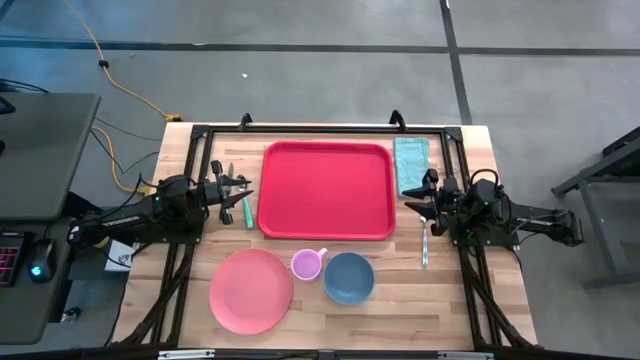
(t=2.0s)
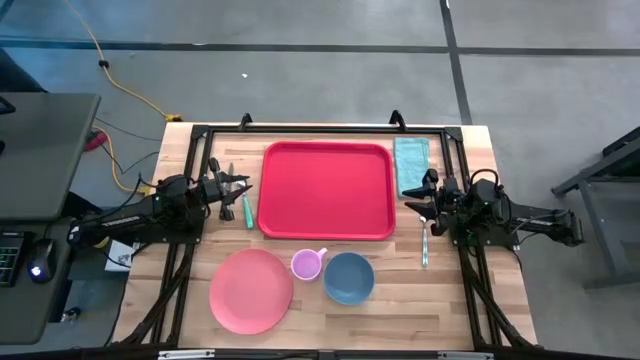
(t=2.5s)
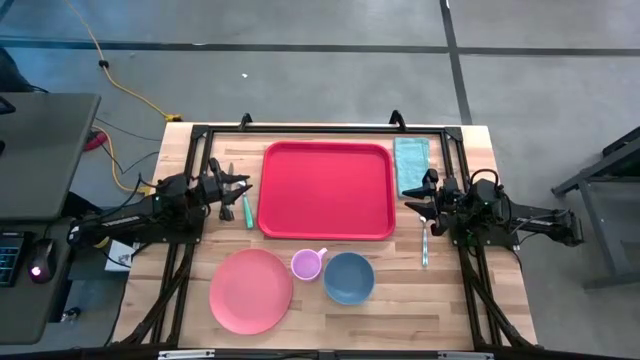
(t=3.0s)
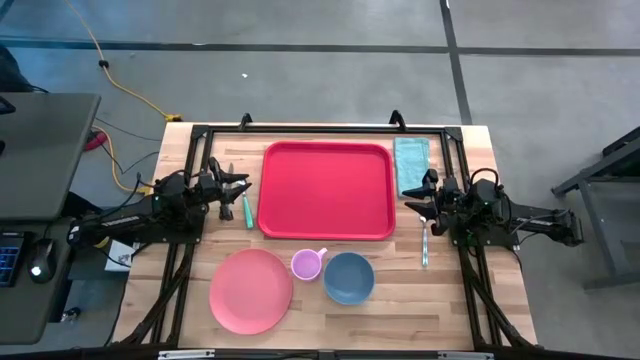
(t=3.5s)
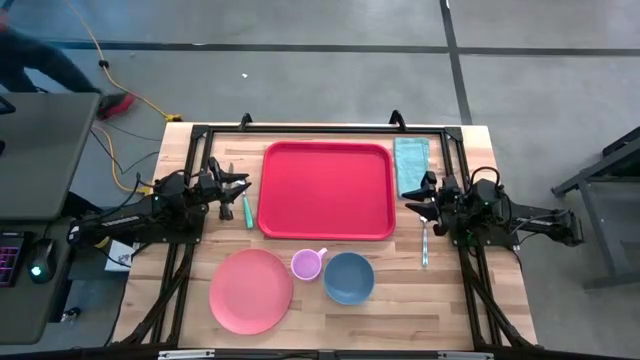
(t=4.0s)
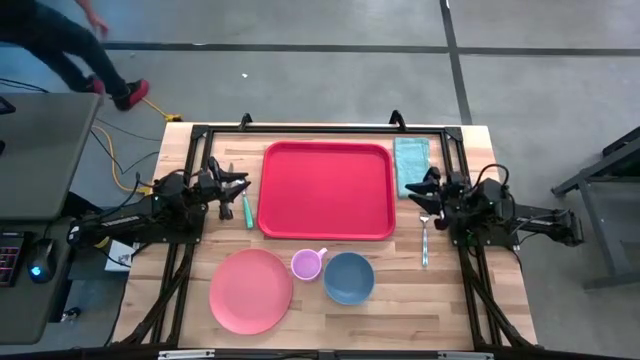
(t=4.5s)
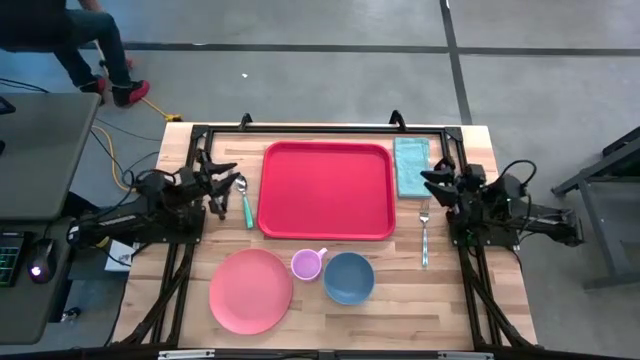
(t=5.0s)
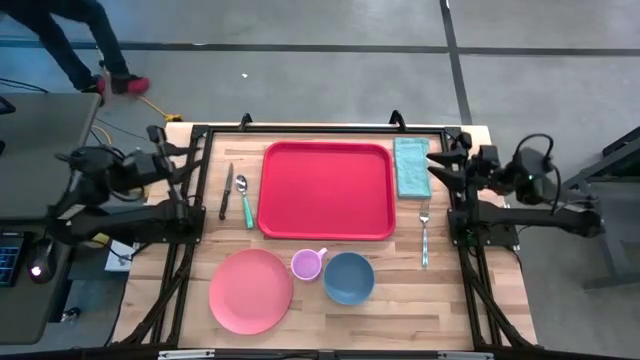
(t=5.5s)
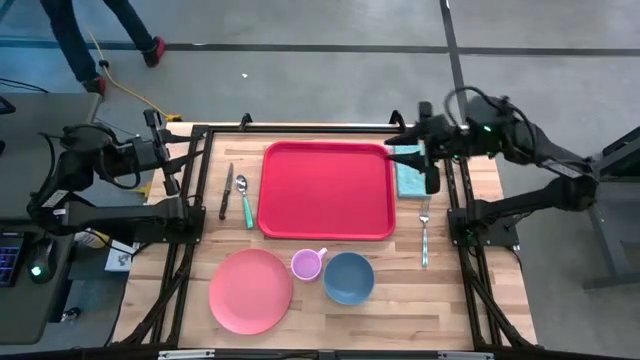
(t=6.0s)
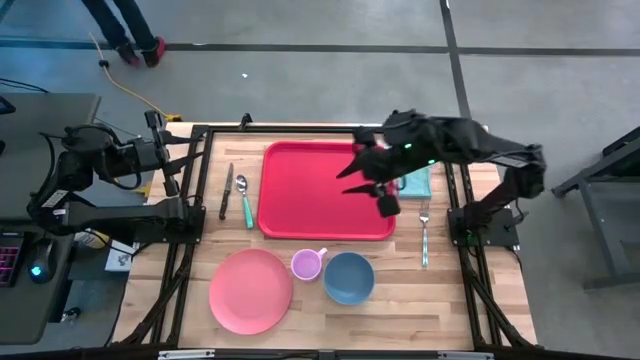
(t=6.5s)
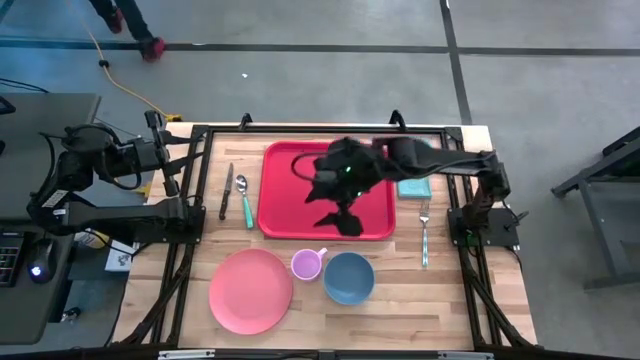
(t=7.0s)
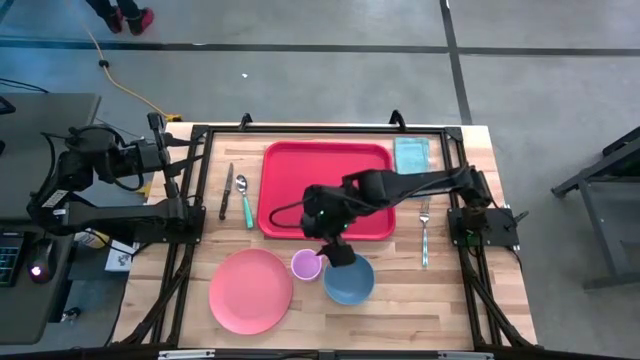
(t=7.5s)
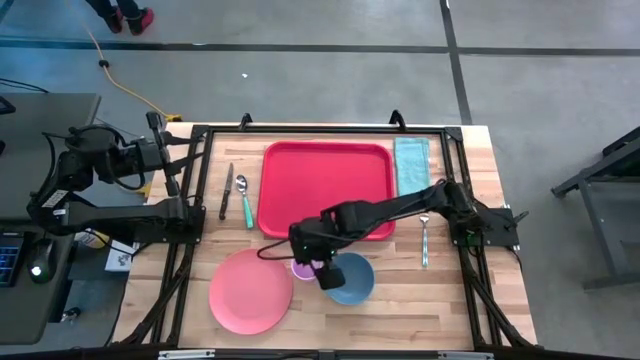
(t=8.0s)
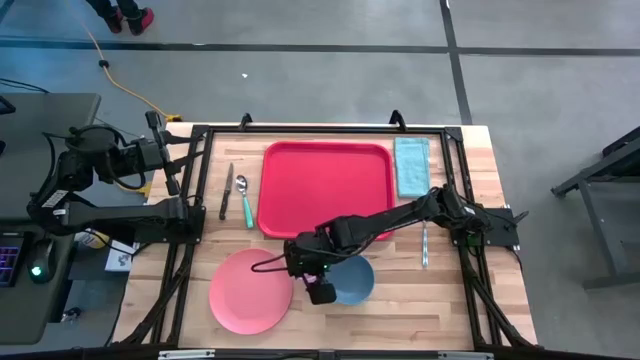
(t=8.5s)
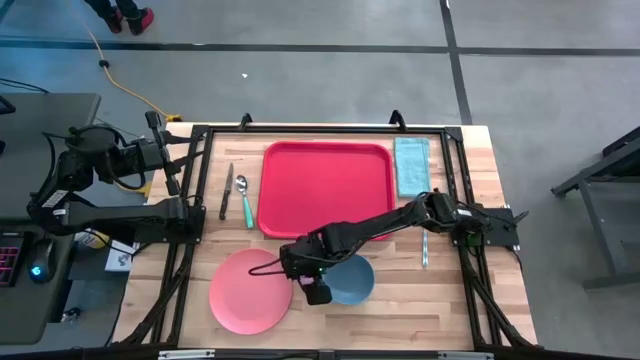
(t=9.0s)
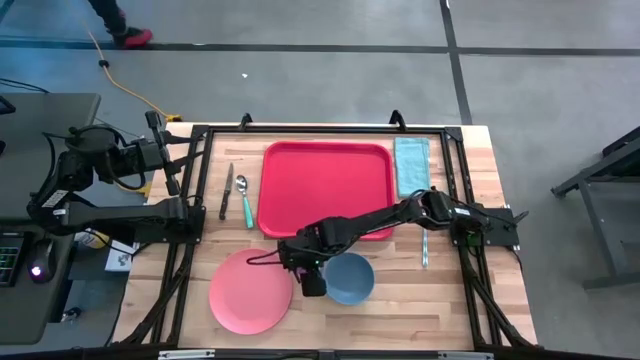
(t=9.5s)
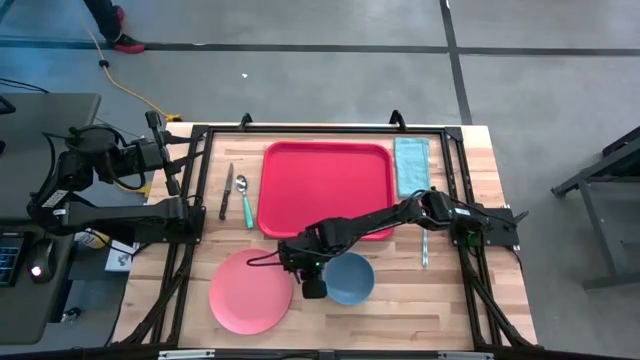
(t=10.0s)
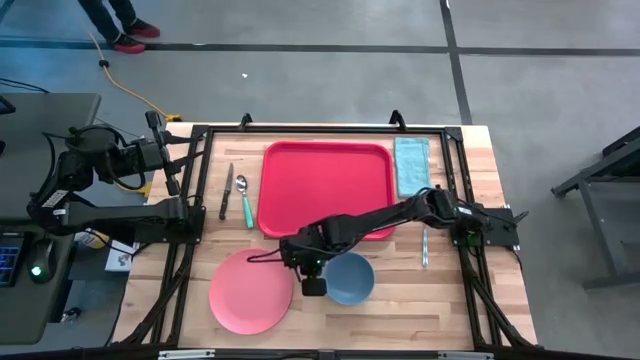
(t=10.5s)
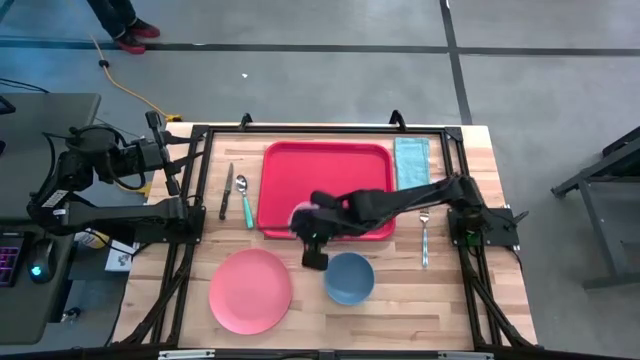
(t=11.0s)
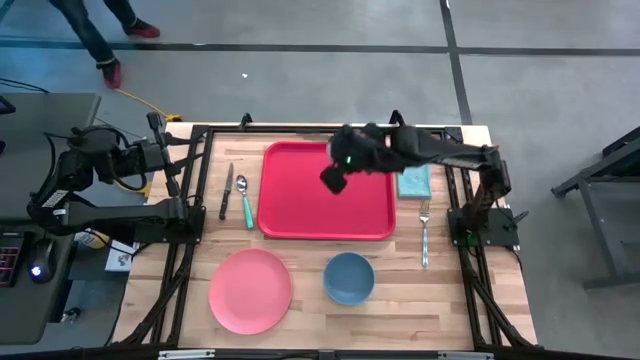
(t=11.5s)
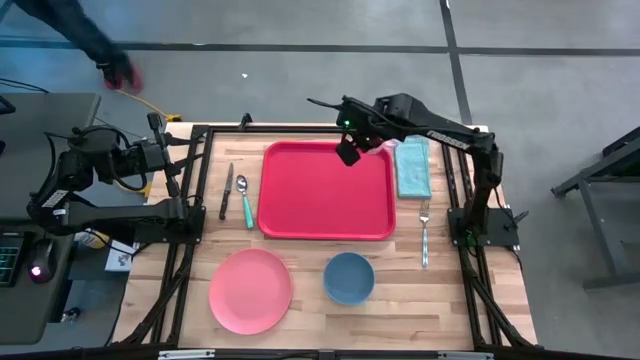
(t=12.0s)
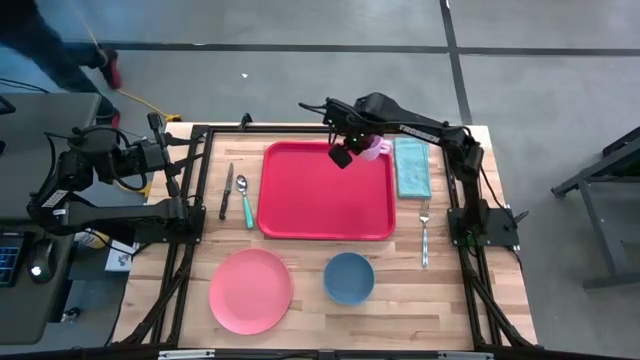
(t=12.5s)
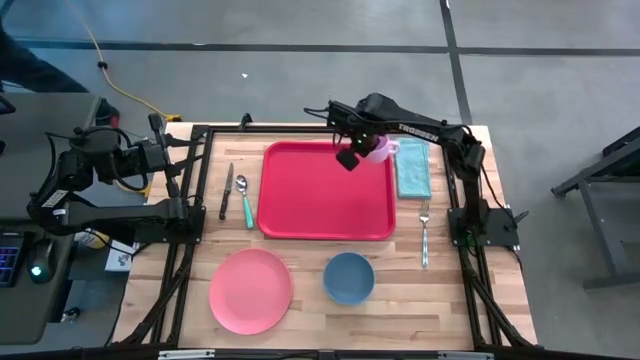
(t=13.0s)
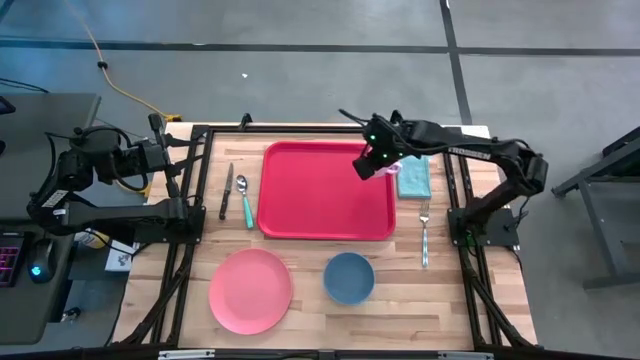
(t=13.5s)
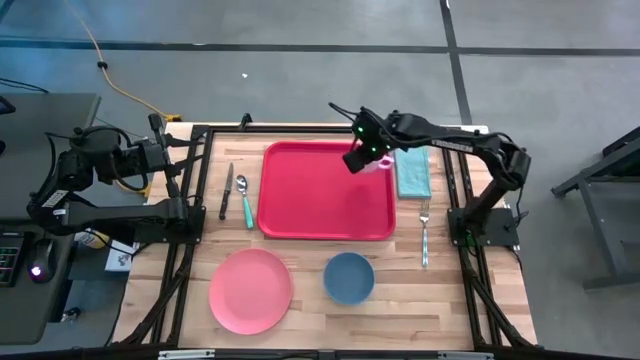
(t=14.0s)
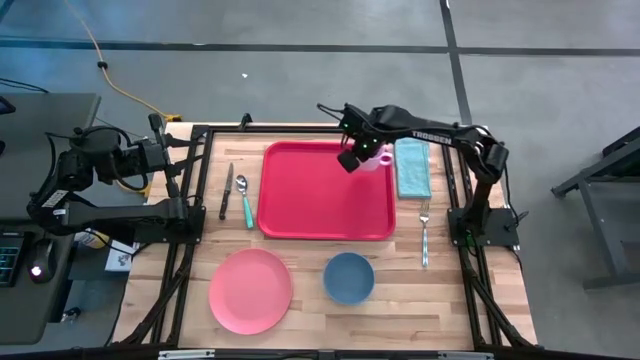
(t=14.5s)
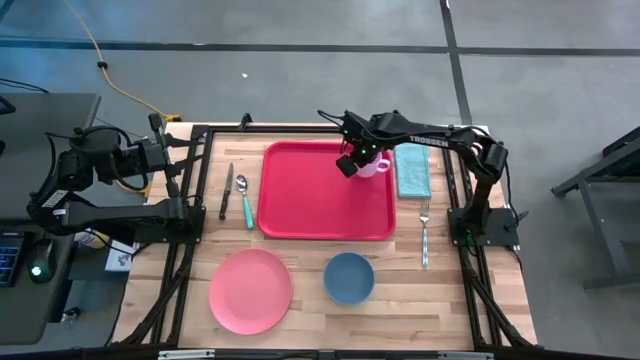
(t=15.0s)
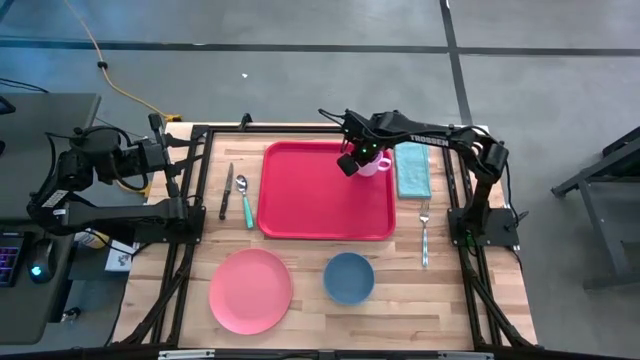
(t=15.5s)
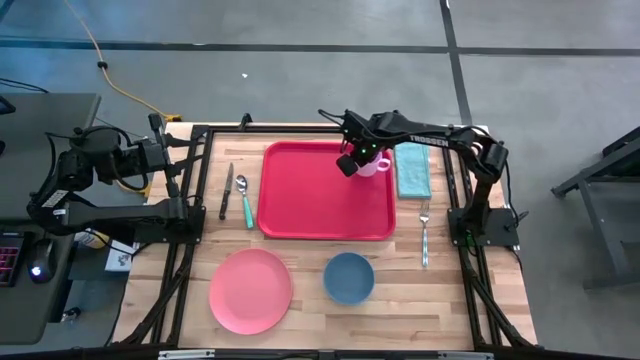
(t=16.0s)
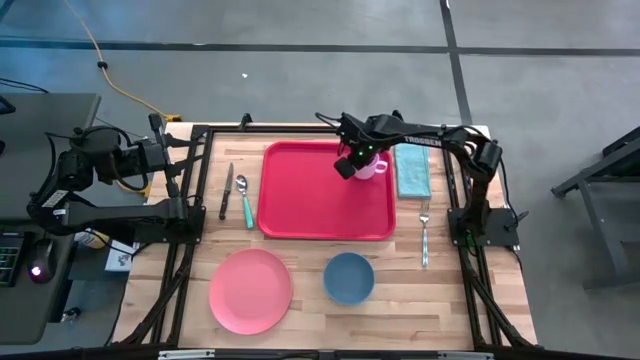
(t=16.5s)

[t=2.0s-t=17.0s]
Task: Set up tray
Put the purple cup on the tray

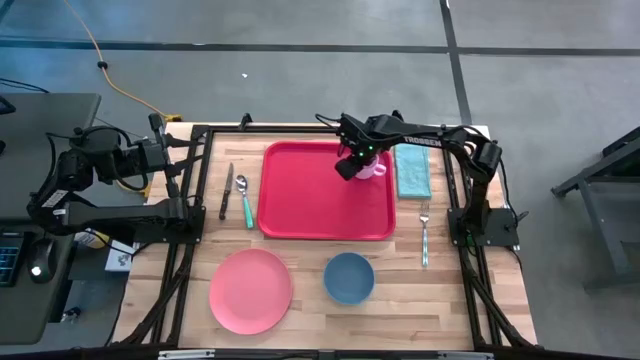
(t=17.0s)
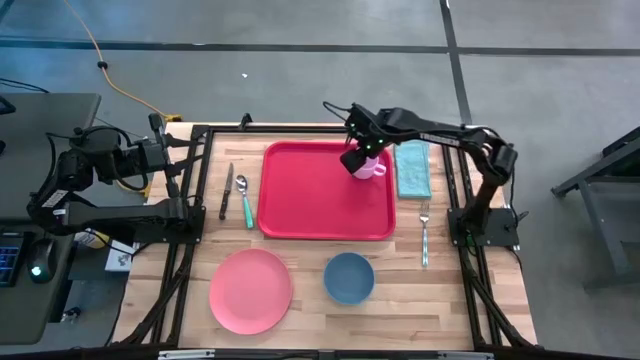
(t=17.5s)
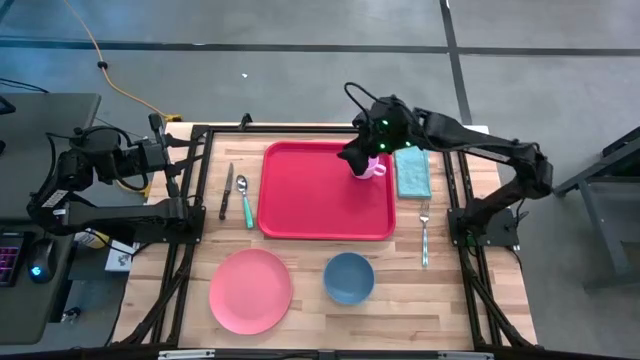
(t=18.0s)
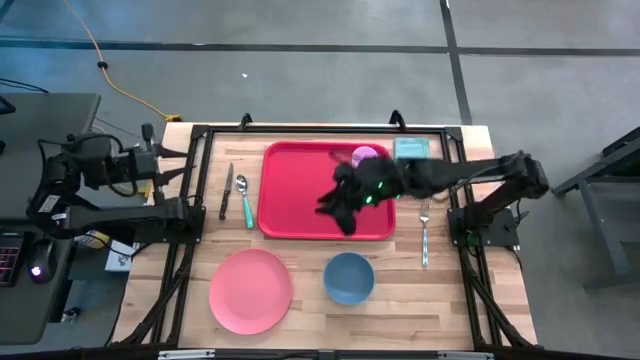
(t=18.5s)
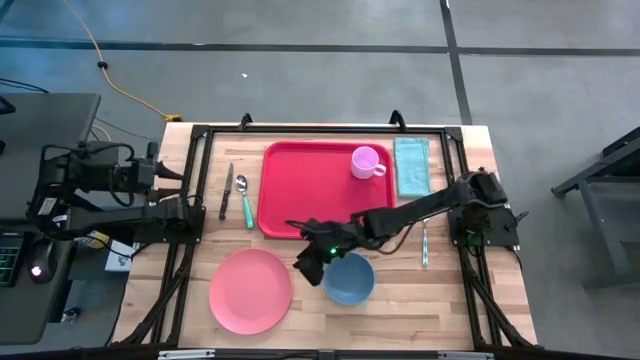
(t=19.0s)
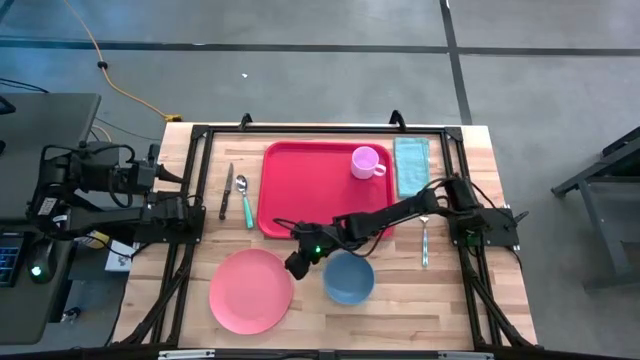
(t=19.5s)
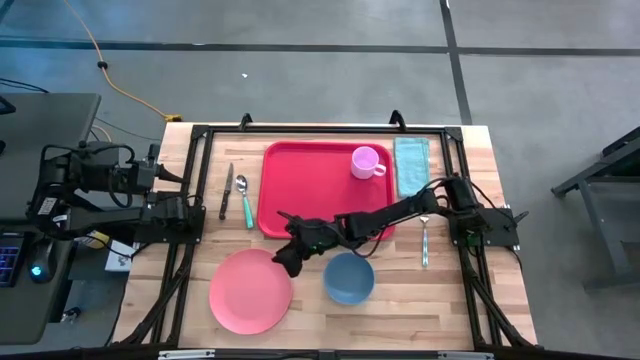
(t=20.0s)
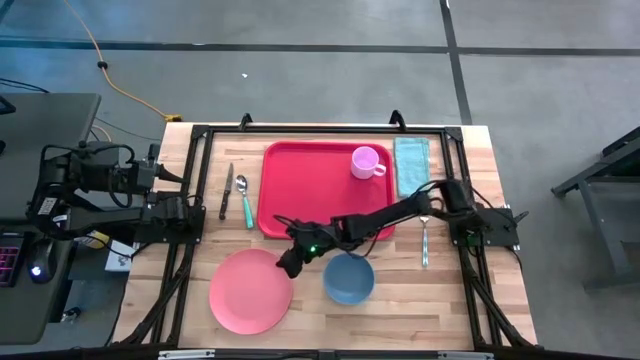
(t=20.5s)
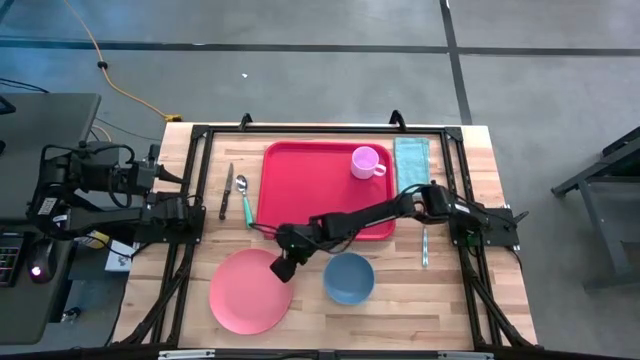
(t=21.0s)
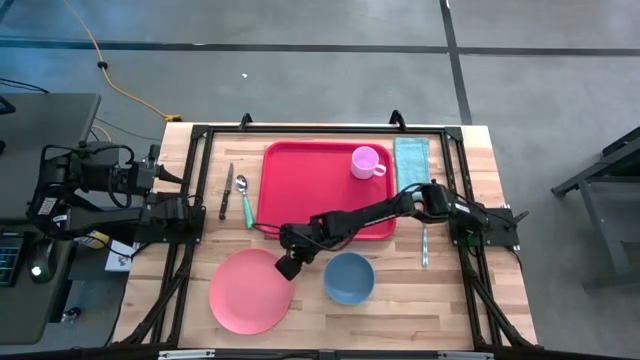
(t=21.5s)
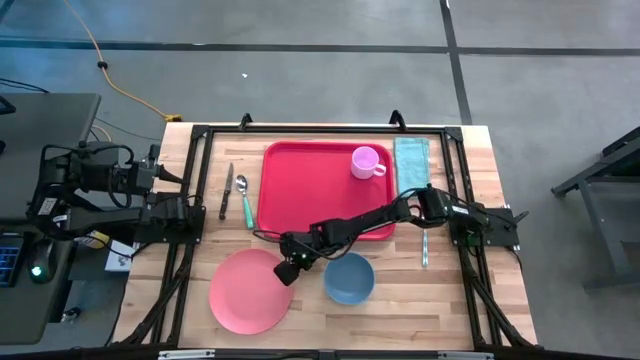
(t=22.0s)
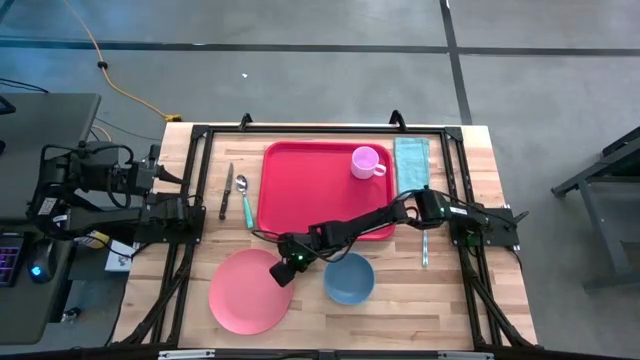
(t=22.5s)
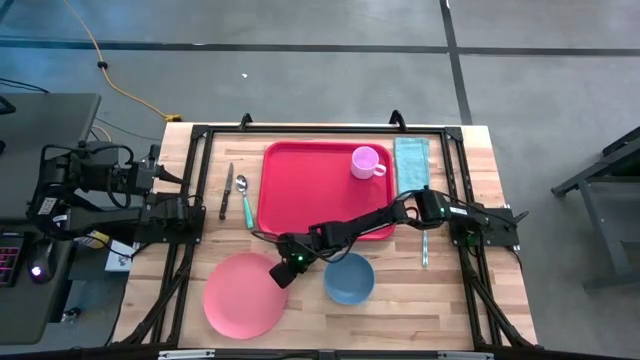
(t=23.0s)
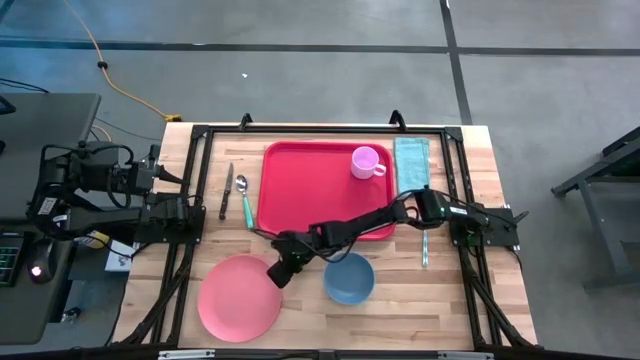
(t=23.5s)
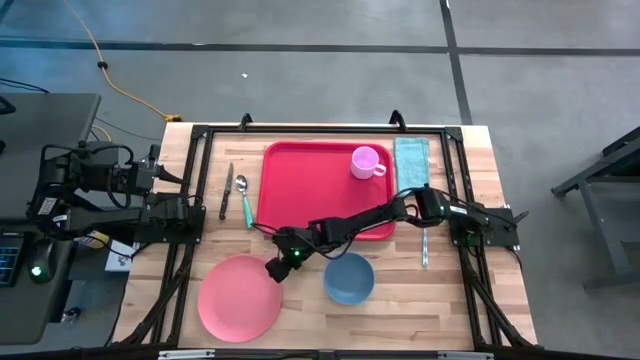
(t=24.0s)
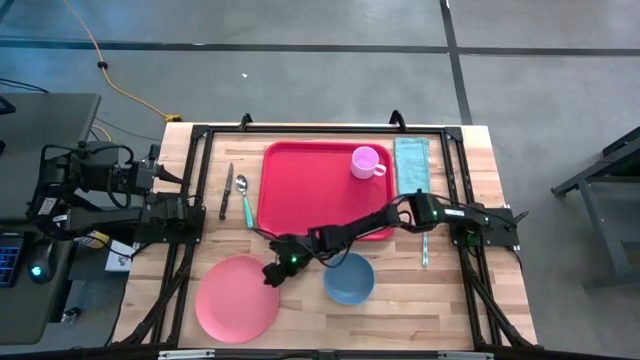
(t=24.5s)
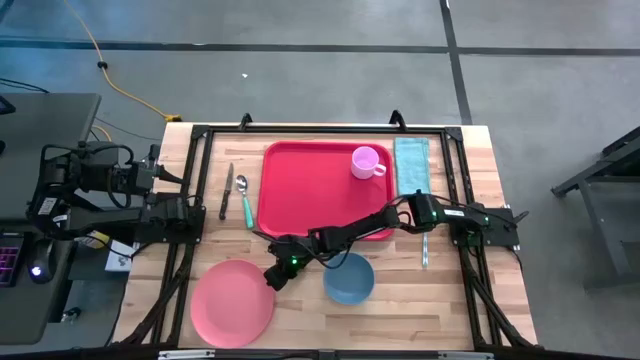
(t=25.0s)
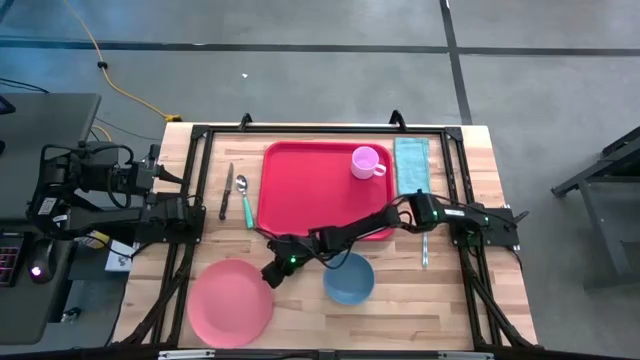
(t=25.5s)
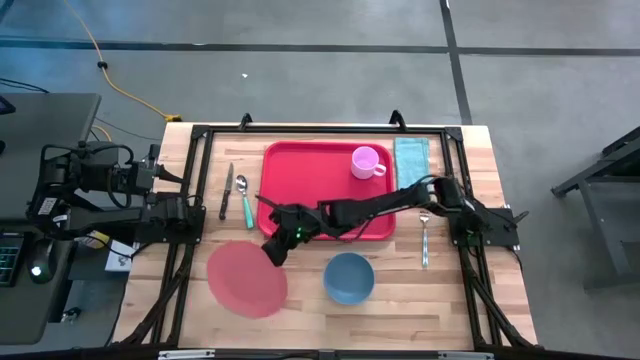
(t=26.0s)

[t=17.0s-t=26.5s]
Put the pink plate on the tray
